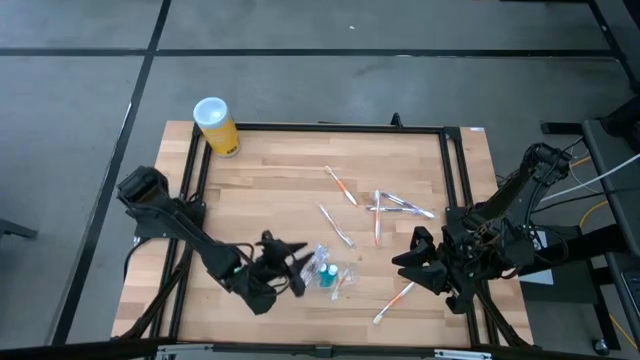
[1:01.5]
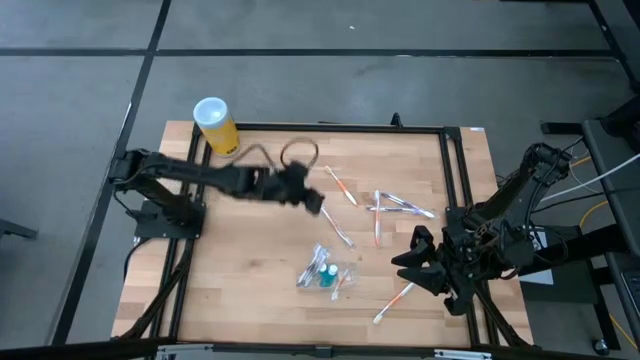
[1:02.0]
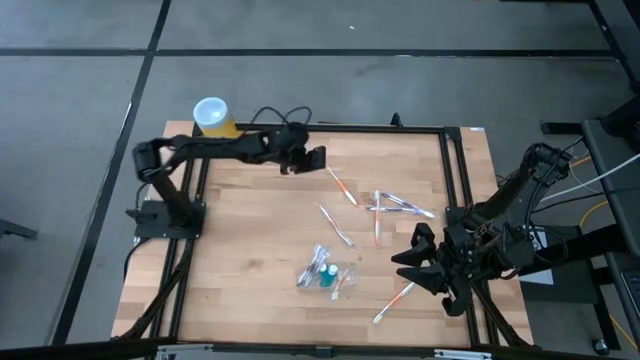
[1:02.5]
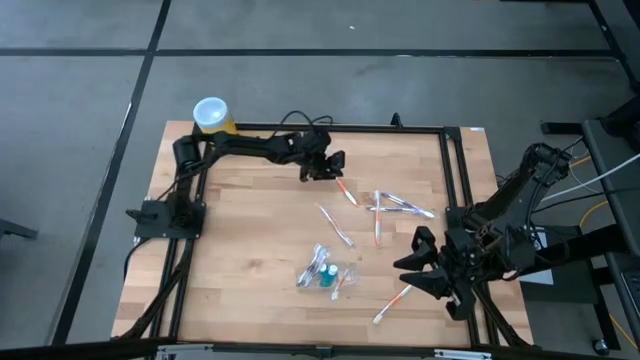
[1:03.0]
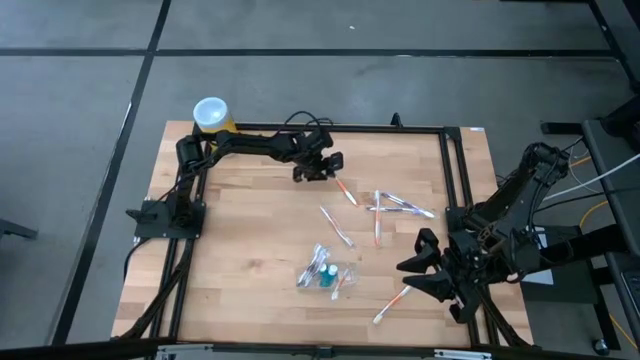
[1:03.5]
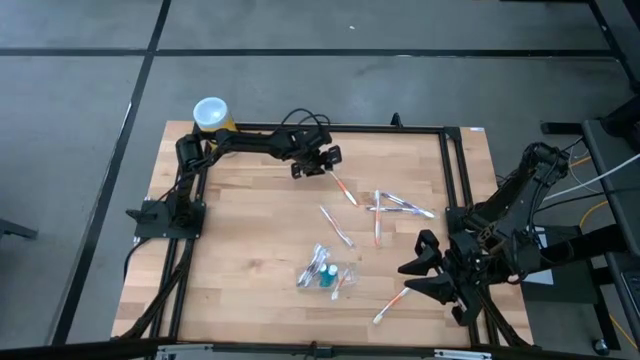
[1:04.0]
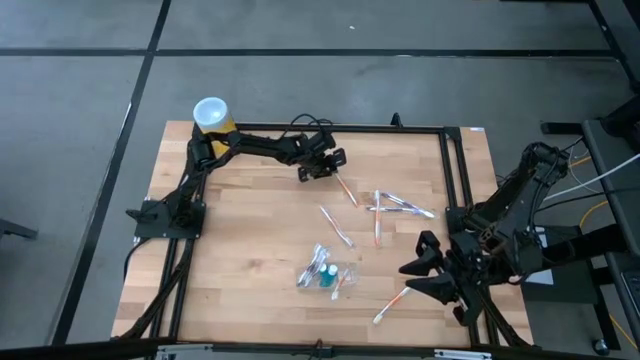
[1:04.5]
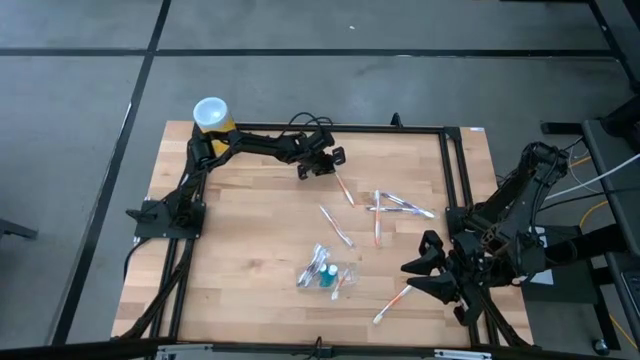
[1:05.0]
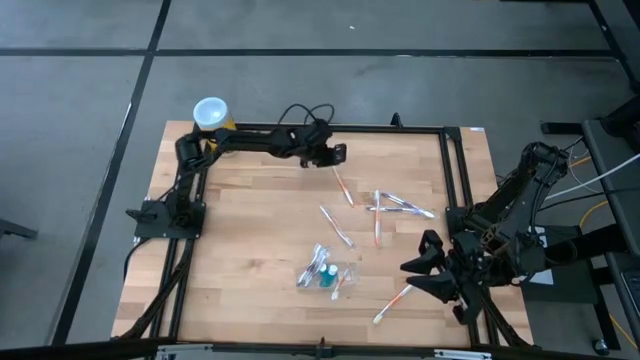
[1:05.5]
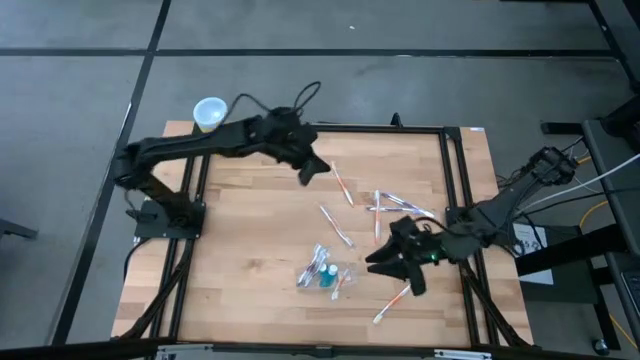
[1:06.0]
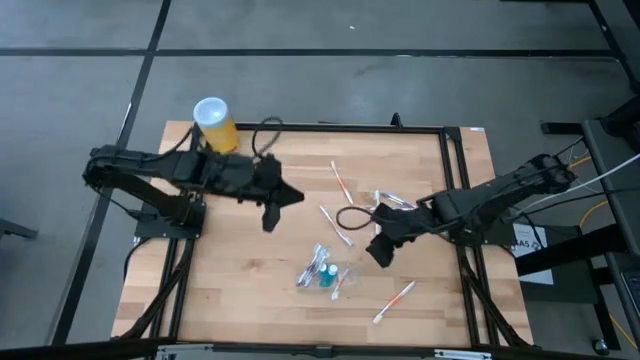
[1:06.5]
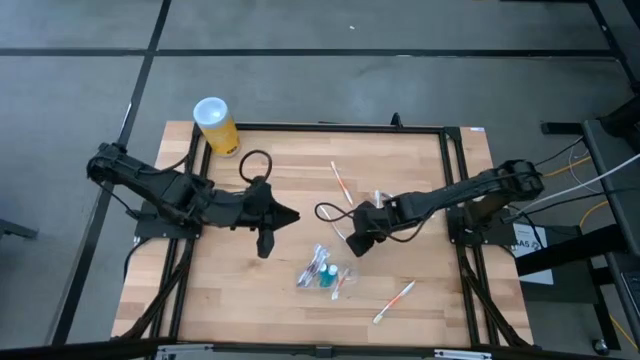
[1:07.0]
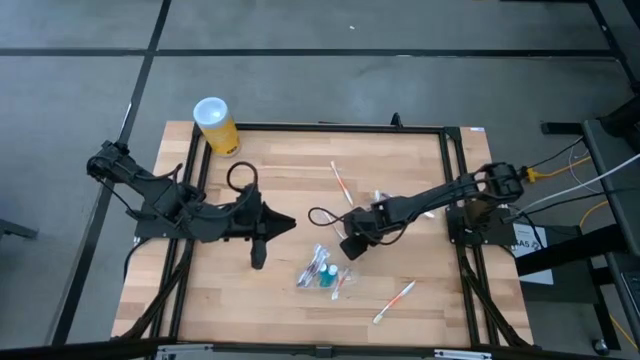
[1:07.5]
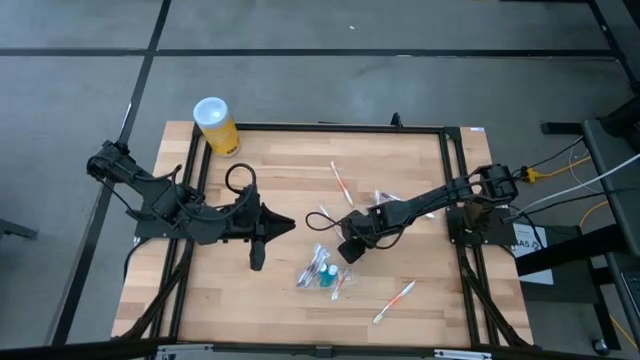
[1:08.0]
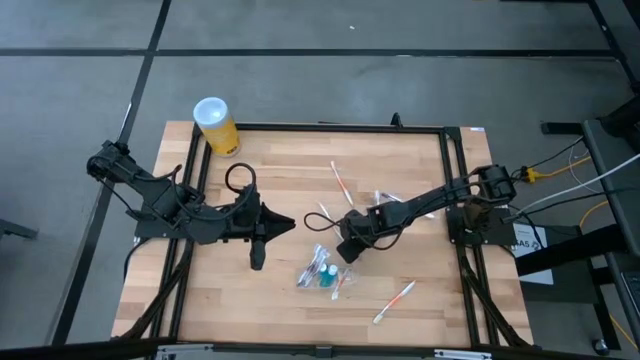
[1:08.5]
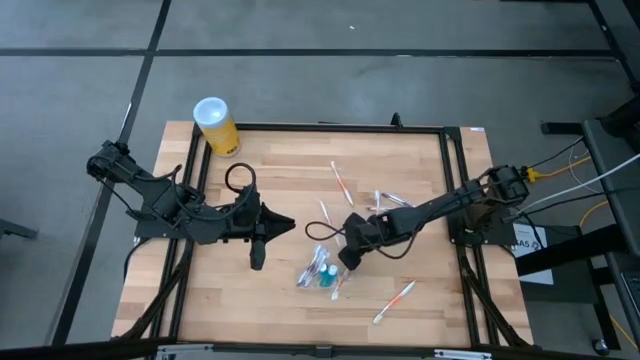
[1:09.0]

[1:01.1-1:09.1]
Task: Pick & Place toothbrushing station
Put the orange toothbrush into the right section of the transparent organizer

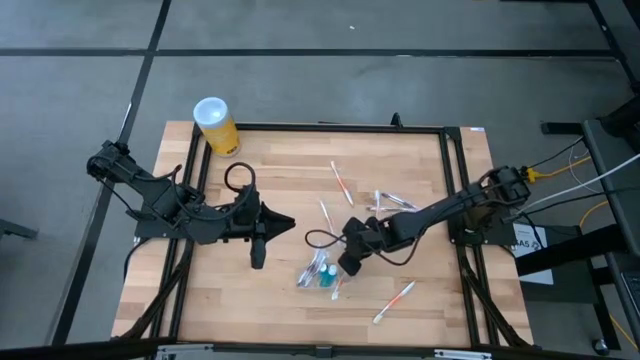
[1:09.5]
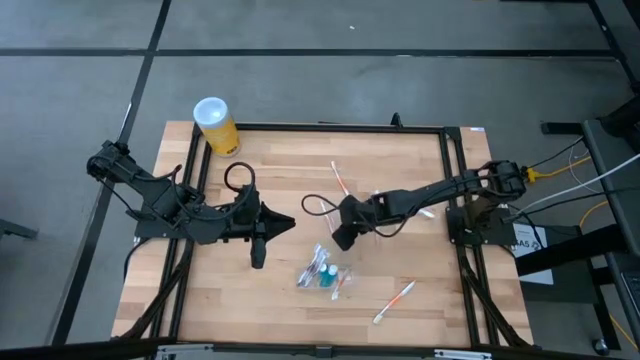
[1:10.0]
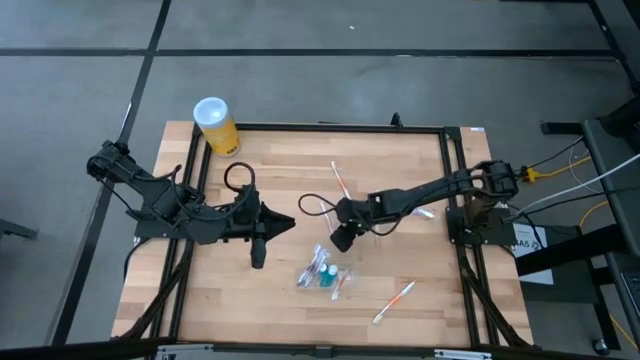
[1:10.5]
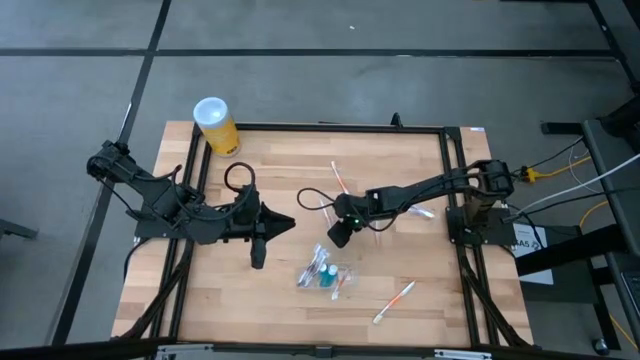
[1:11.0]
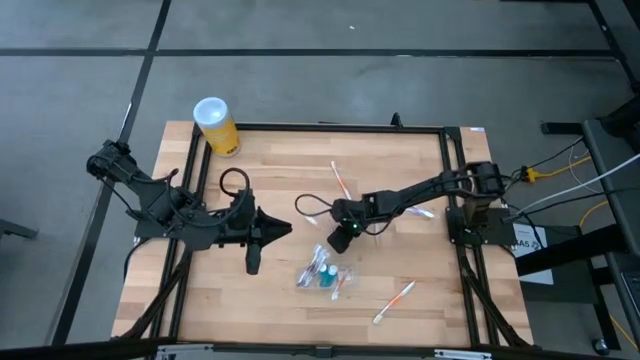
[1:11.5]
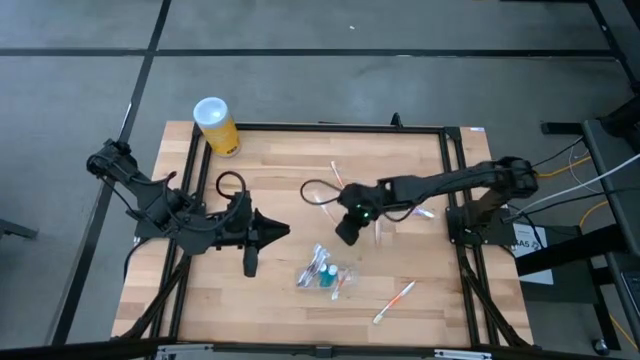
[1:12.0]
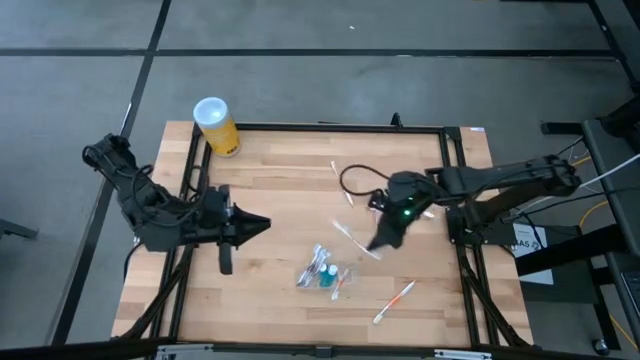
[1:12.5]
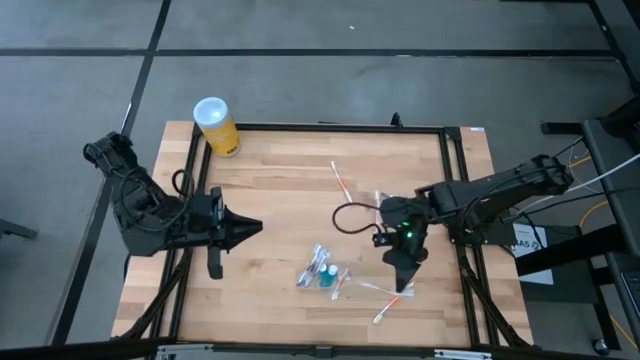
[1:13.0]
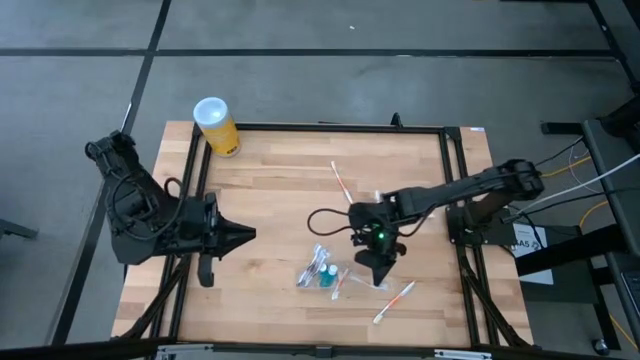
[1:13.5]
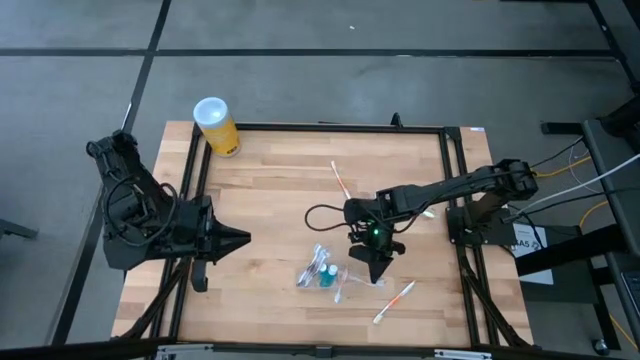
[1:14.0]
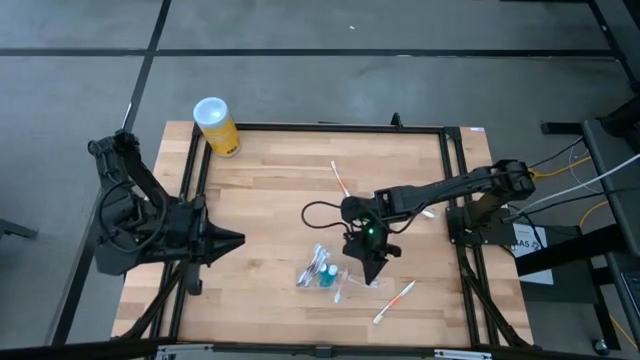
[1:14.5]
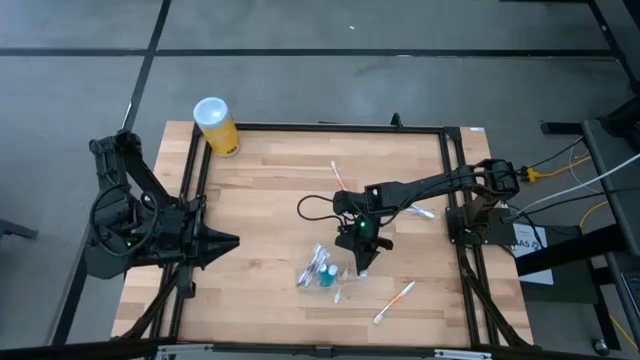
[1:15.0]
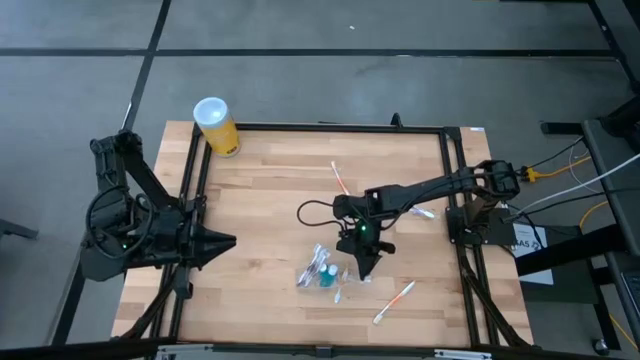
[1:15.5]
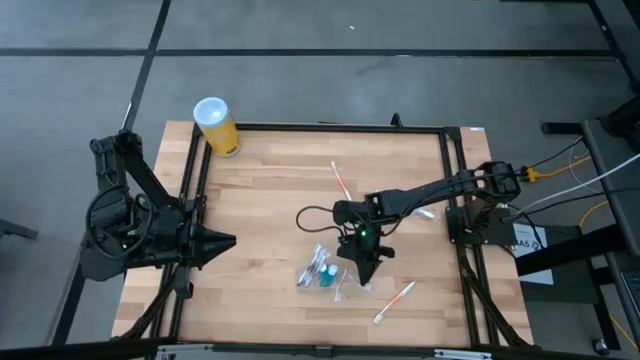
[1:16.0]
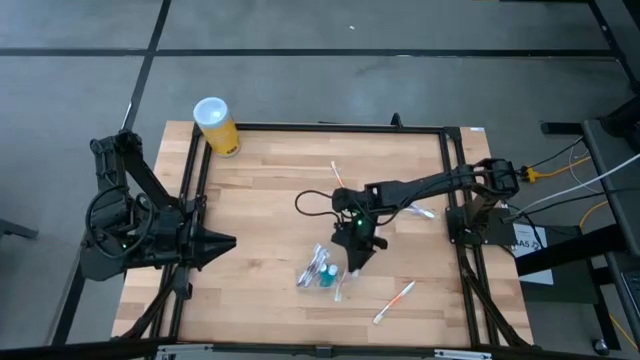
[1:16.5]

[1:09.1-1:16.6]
Put the orange toothbrush into the right section of the transparent organizer

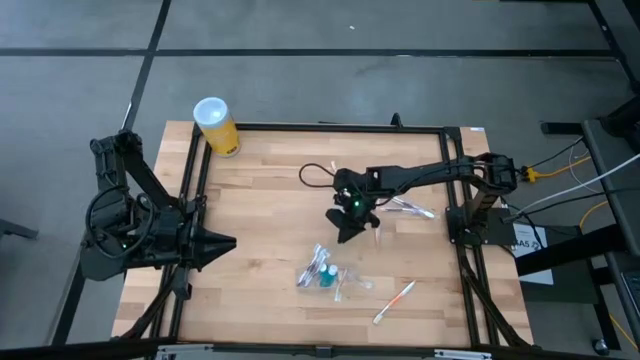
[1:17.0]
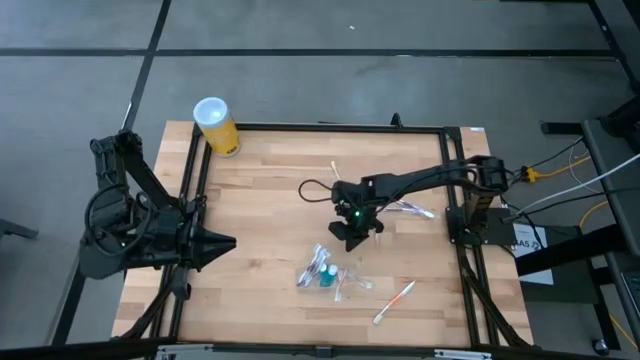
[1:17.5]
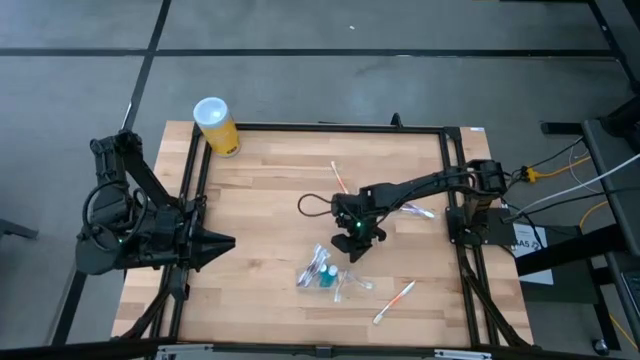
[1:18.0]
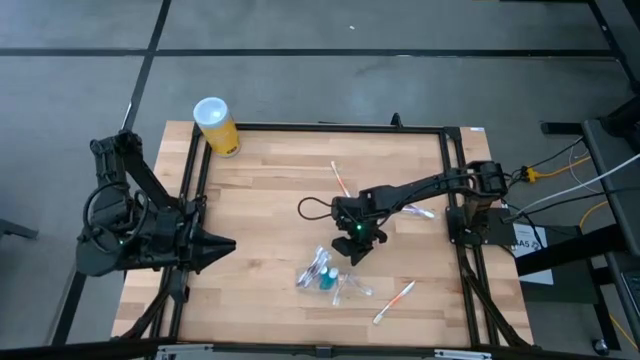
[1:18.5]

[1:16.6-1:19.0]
Adjust the transparent organizer

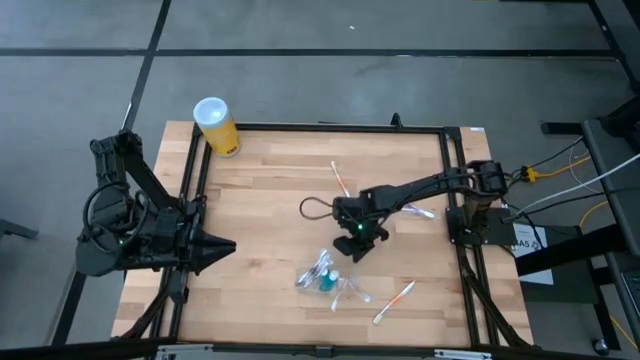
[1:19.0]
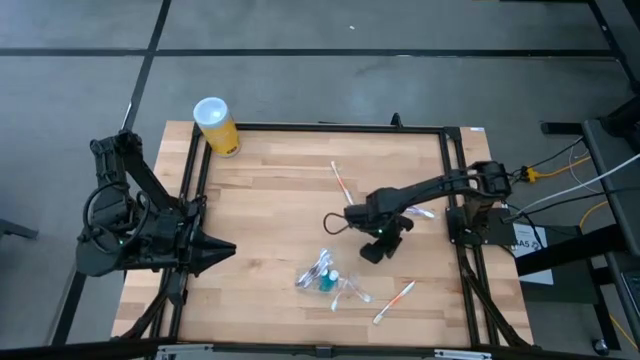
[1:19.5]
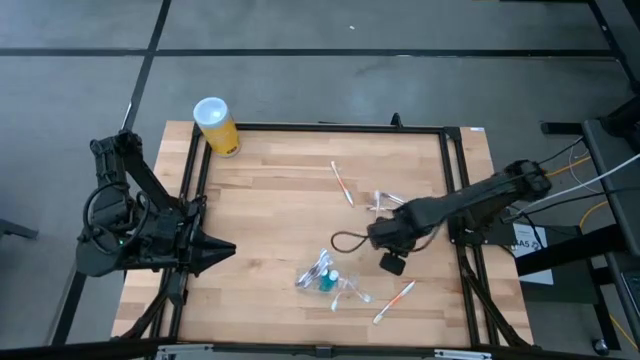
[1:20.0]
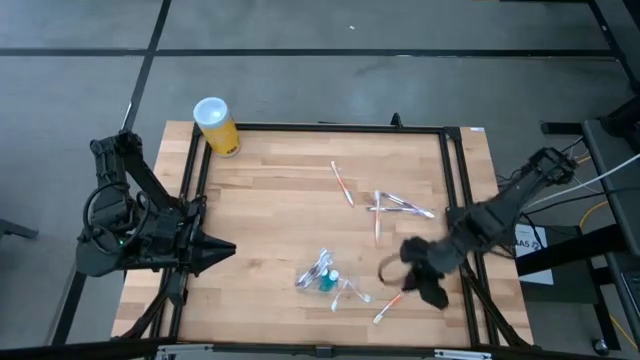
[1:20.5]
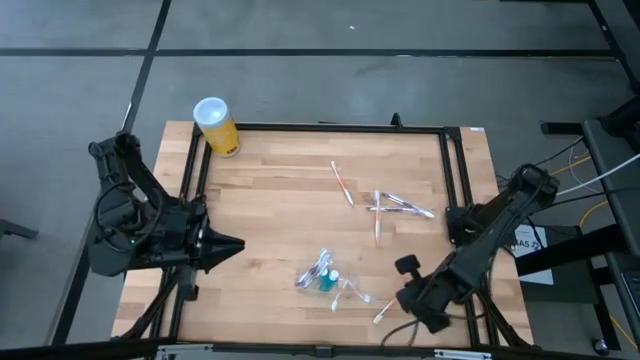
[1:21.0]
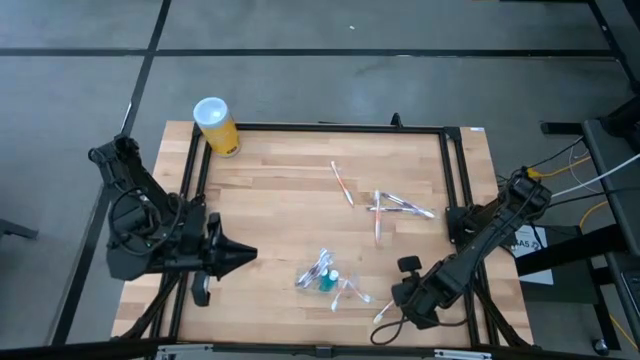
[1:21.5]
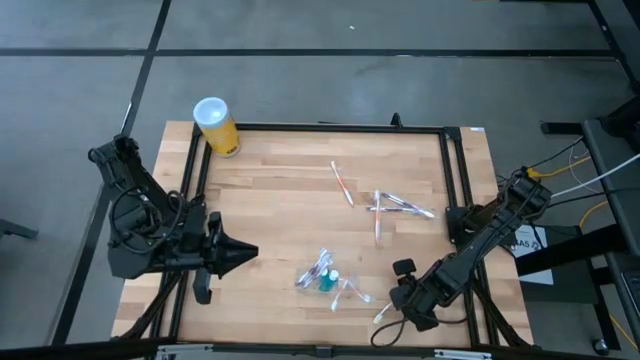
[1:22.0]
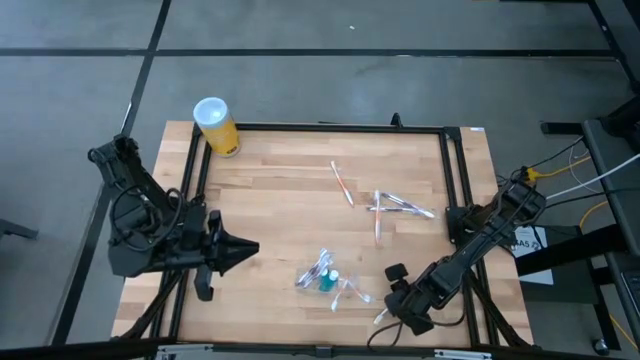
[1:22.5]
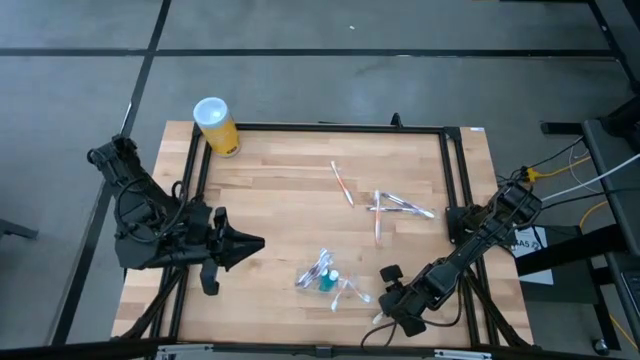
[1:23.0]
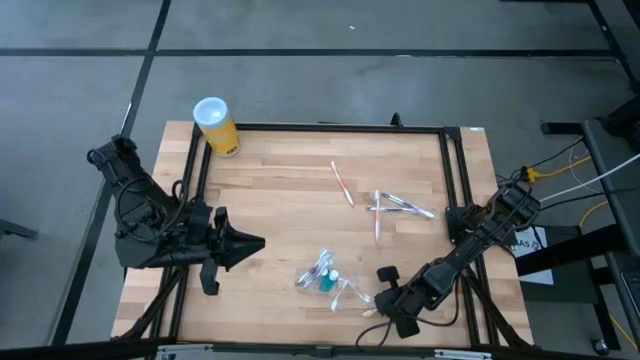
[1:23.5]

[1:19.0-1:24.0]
Put the orange toothbrush into the right section of the transparent organizer
